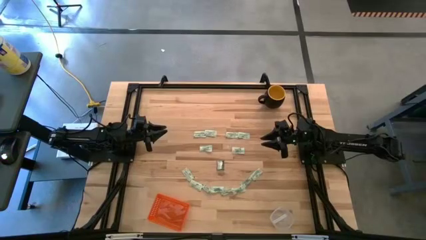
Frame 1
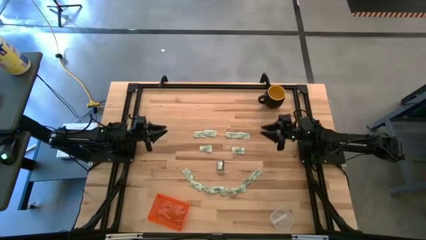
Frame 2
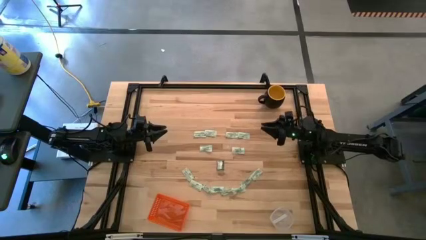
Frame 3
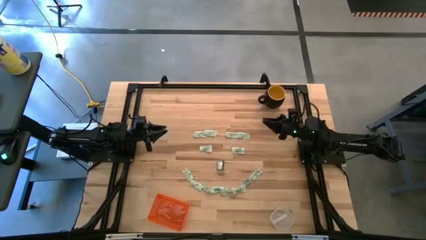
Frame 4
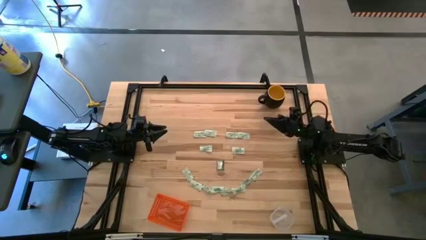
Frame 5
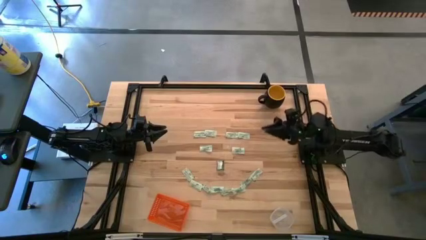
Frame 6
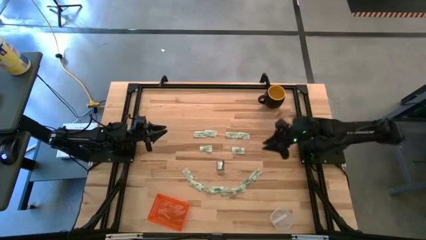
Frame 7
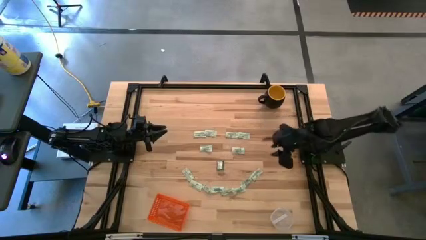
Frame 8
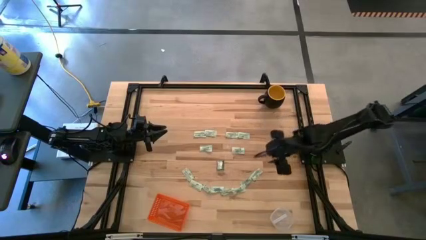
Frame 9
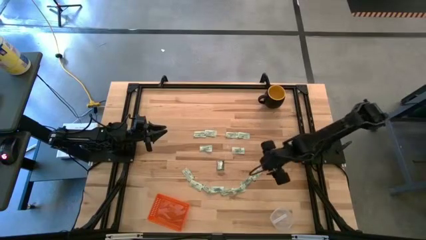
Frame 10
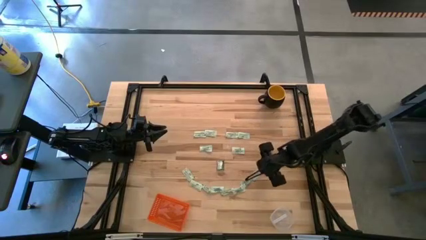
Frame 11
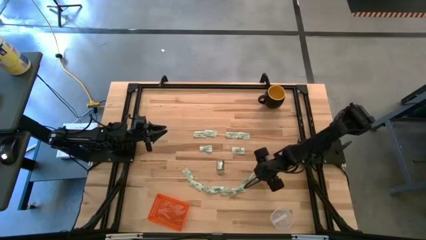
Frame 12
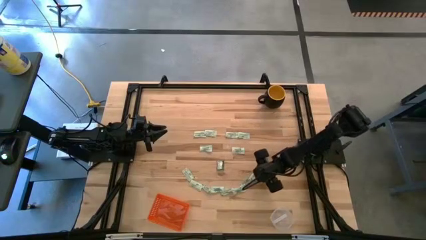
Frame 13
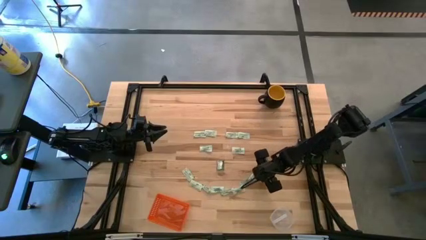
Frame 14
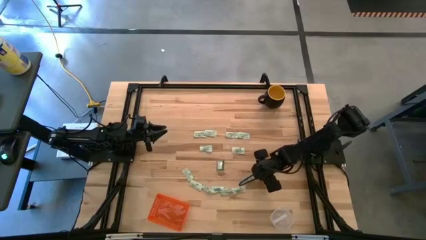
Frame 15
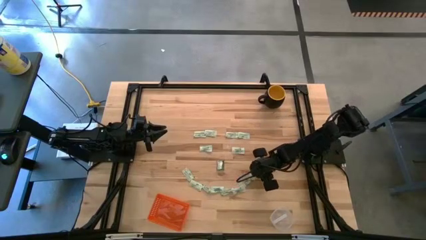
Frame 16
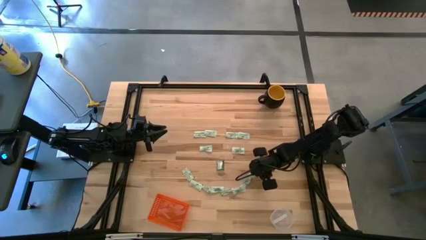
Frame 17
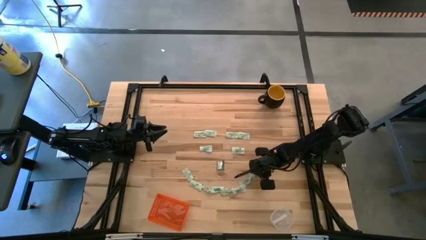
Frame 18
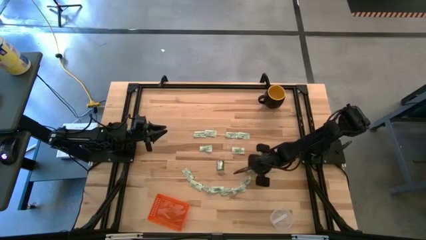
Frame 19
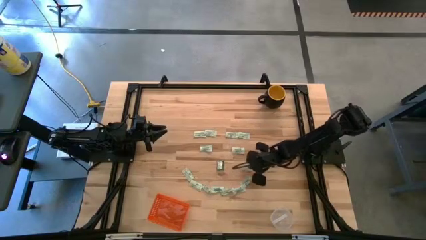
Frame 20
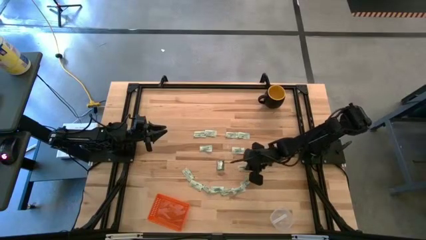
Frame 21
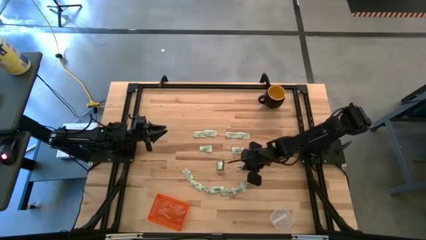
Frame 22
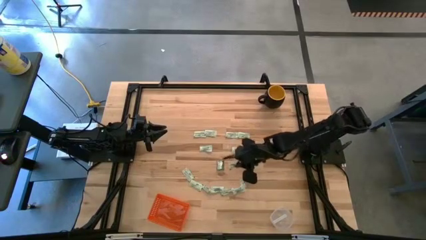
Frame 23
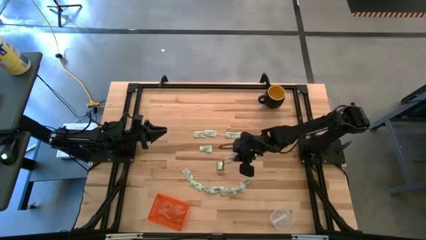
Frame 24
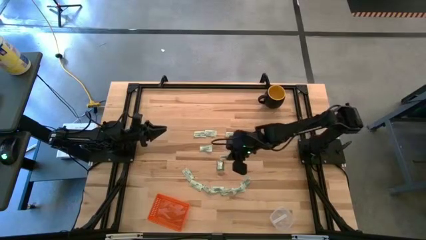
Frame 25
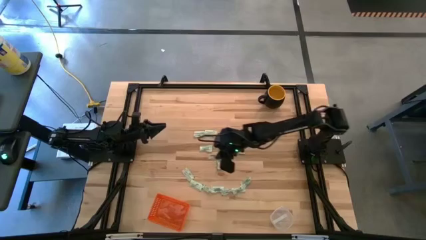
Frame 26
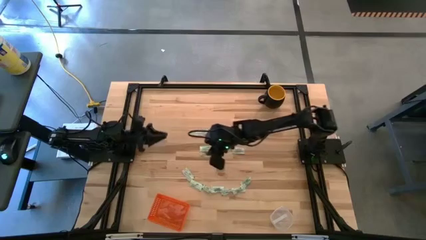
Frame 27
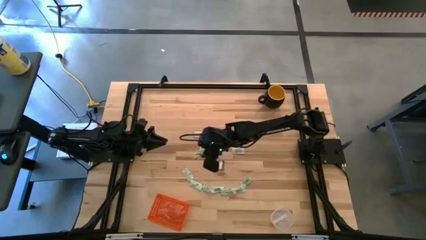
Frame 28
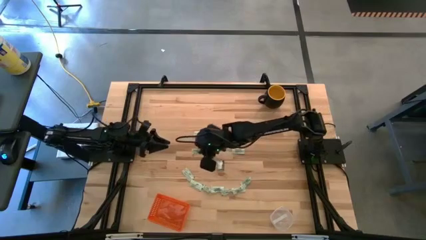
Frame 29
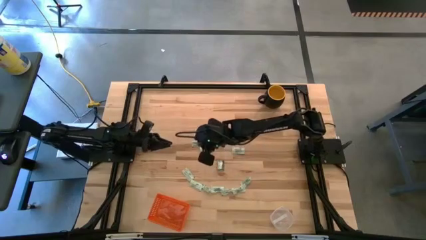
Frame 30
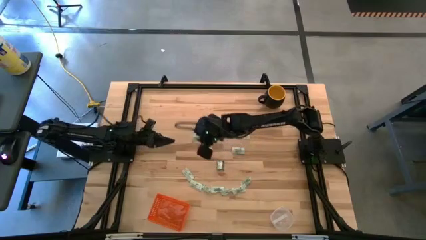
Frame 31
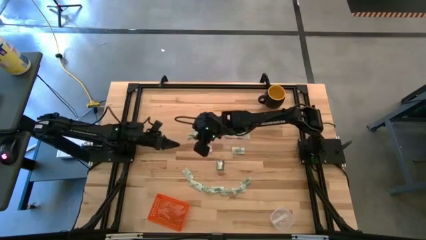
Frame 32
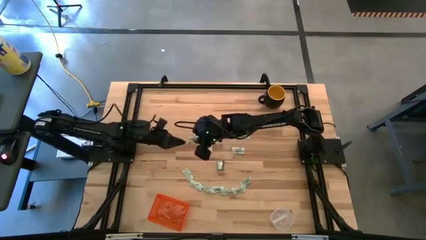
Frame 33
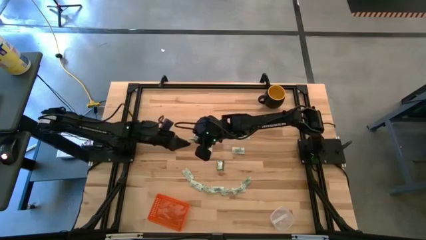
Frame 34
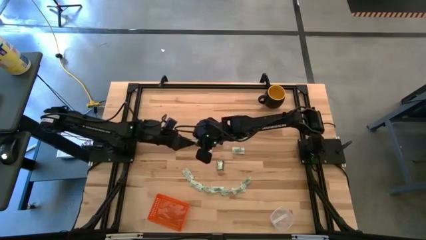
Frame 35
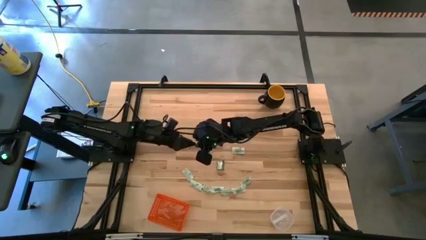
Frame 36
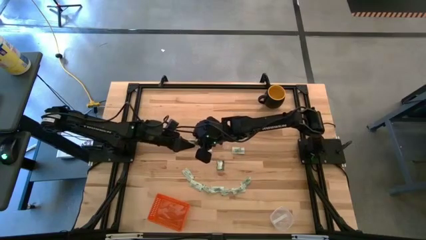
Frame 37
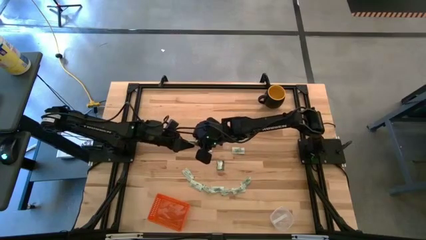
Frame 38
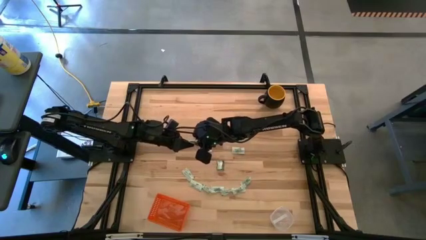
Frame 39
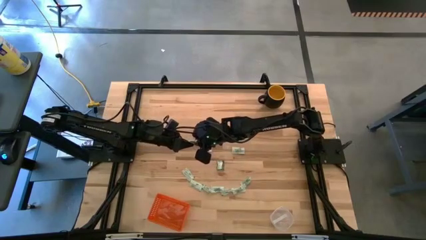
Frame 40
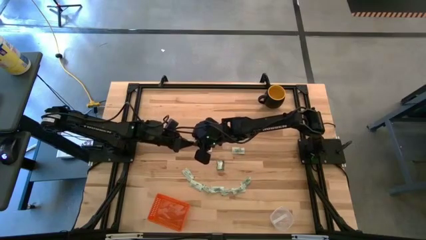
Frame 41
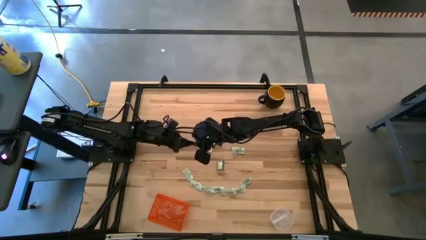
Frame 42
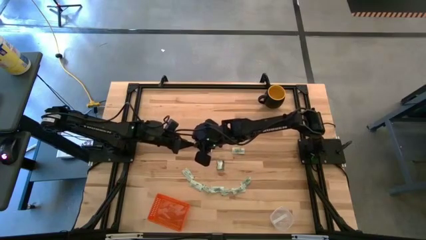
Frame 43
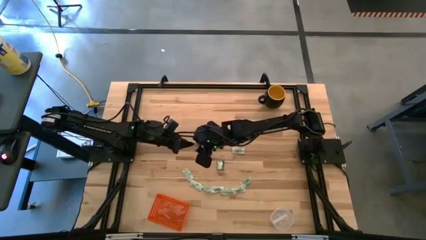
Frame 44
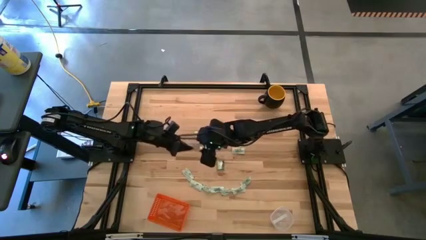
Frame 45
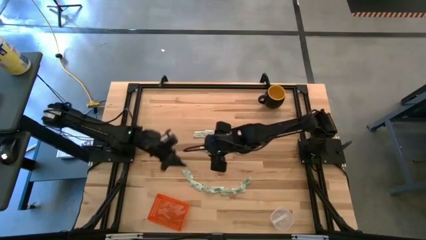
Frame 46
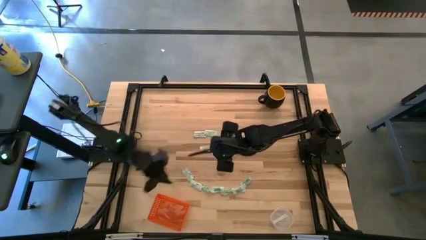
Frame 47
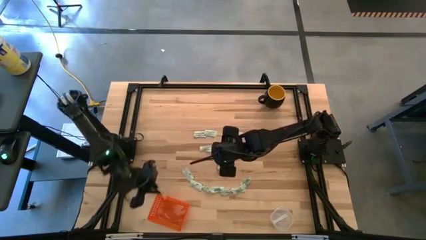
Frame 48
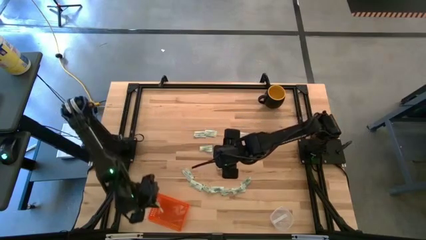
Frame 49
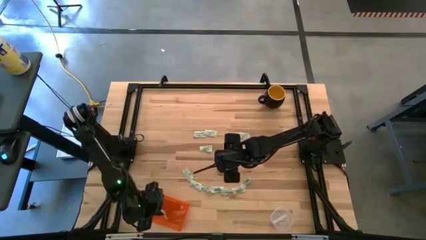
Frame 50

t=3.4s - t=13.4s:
Task: Pick and place items into bin
Put the white stevia packet into the orange bin

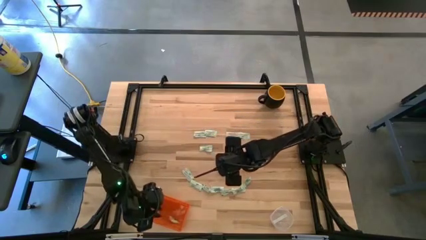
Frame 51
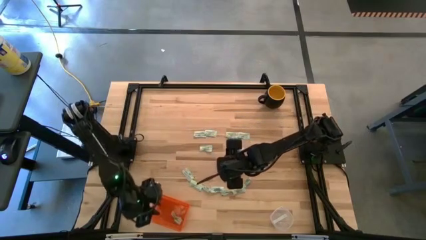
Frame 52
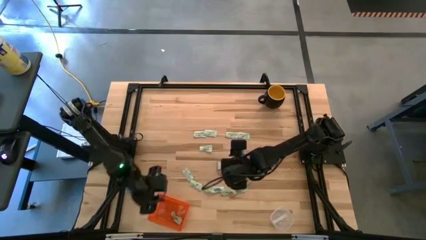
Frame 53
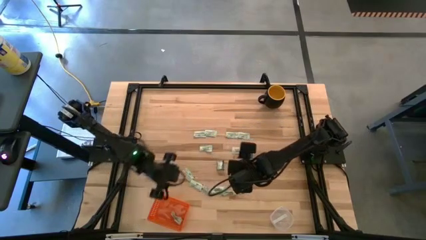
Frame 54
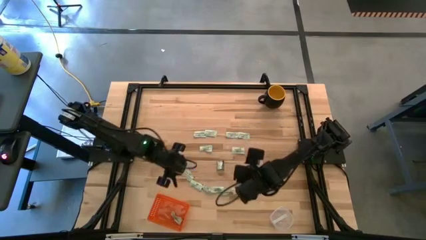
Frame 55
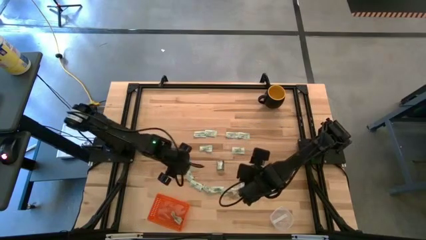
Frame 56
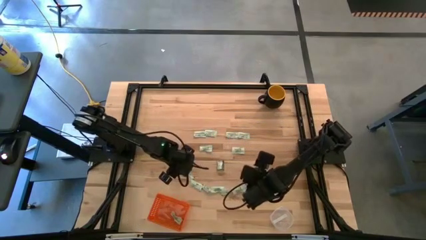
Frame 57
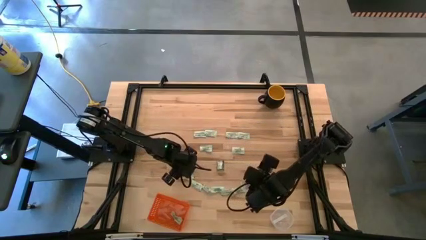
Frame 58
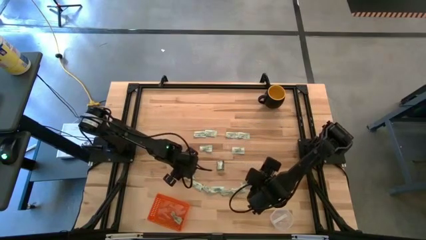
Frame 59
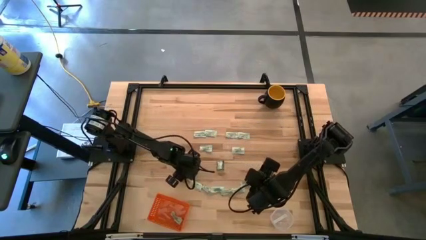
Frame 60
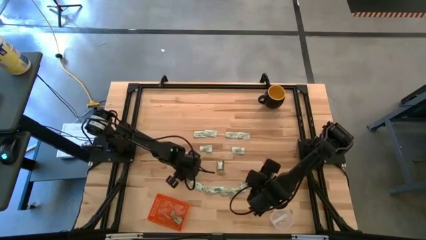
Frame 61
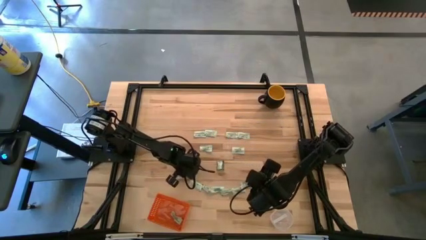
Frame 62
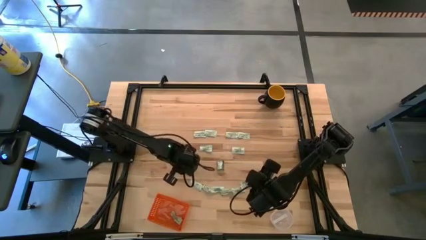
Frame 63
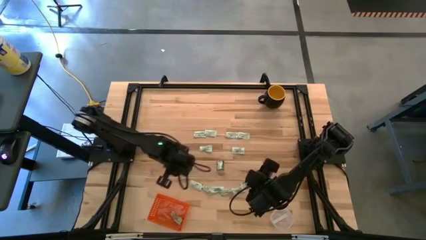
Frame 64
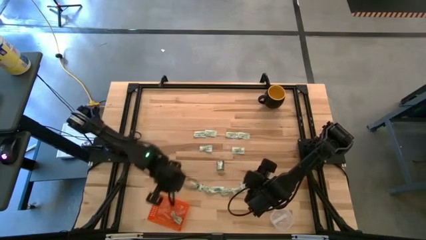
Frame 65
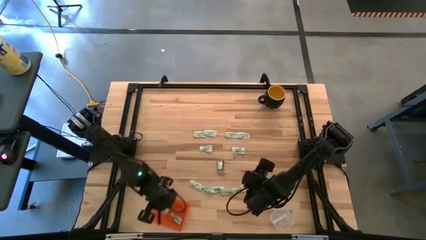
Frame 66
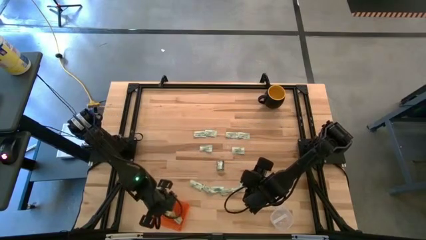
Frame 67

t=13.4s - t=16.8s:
Put the white stevia packet into the orange bin

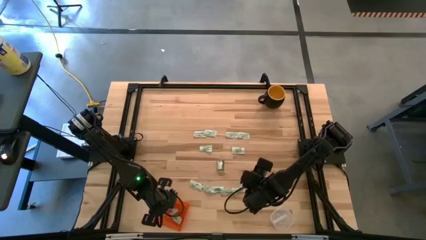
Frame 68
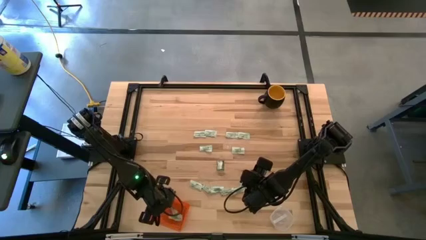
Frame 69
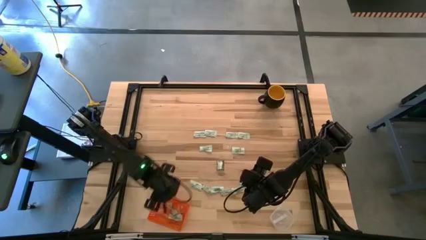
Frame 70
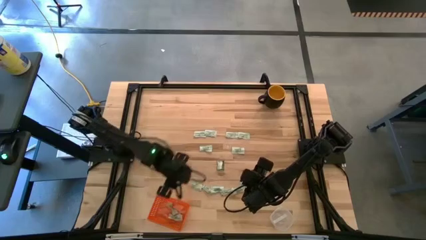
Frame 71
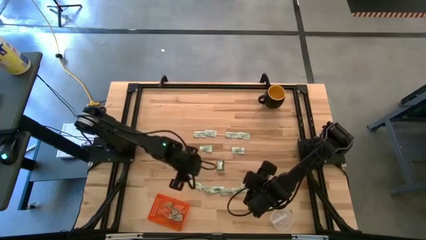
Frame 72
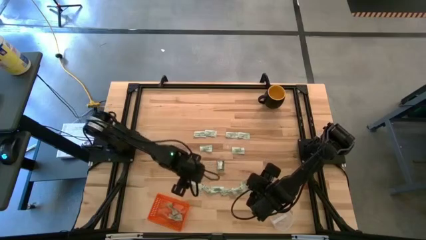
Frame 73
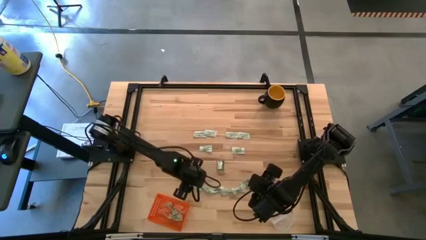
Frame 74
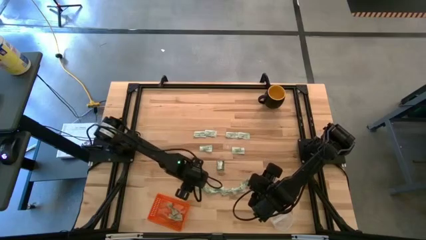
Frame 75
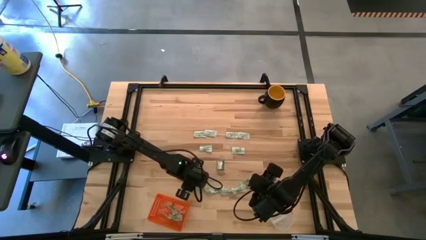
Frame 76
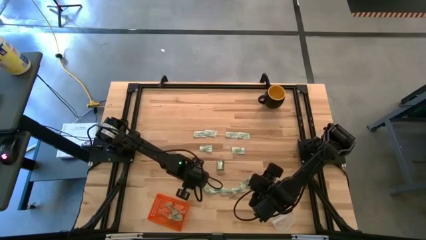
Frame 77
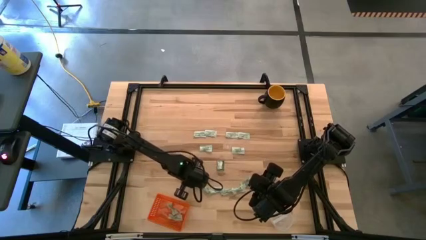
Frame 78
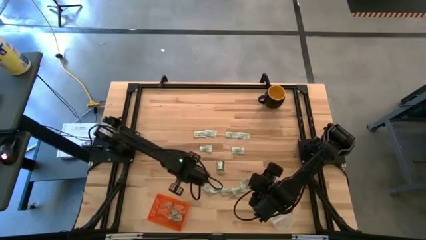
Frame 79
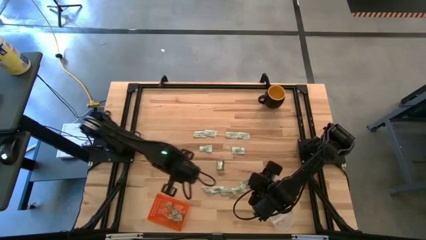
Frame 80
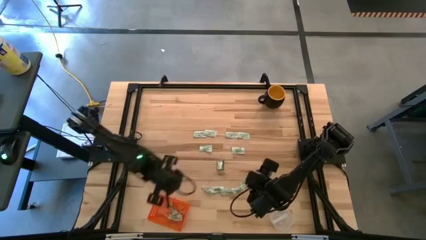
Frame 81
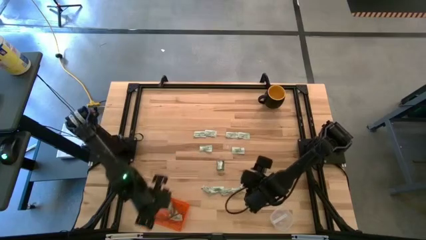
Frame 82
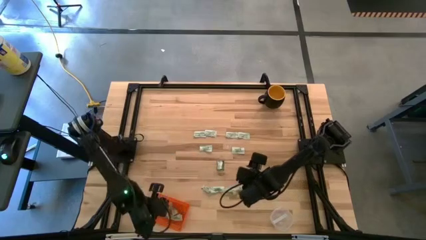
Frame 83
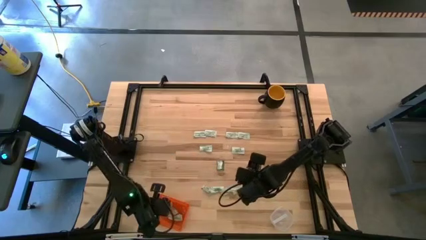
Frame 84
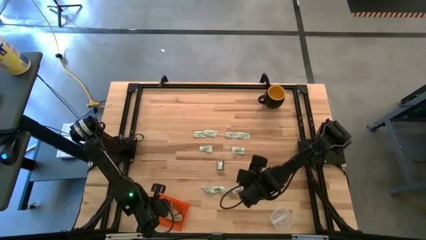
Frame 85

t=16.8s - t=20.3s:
Put the white stevia packet into the orange bin
